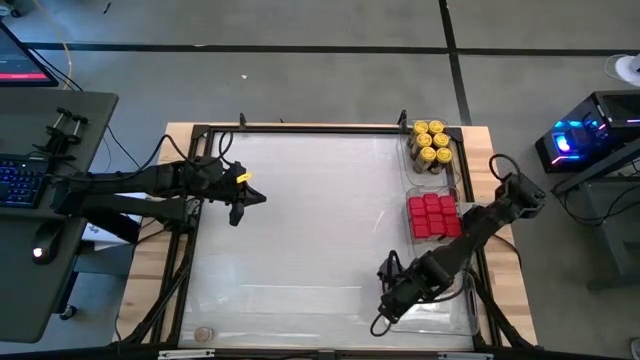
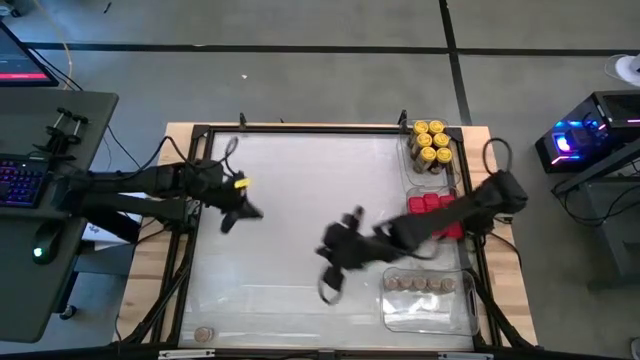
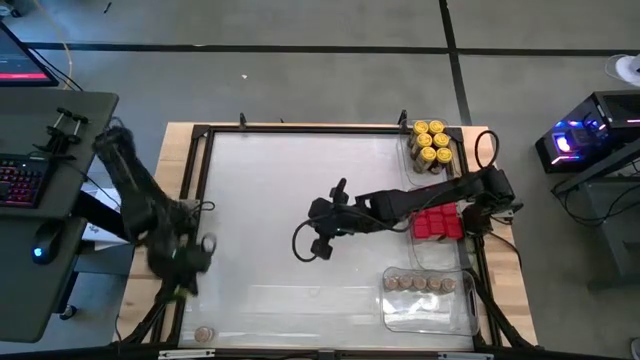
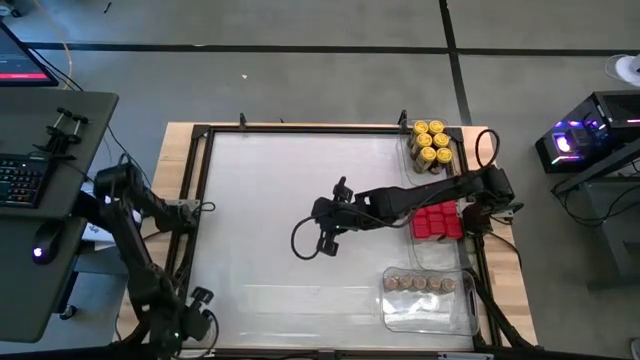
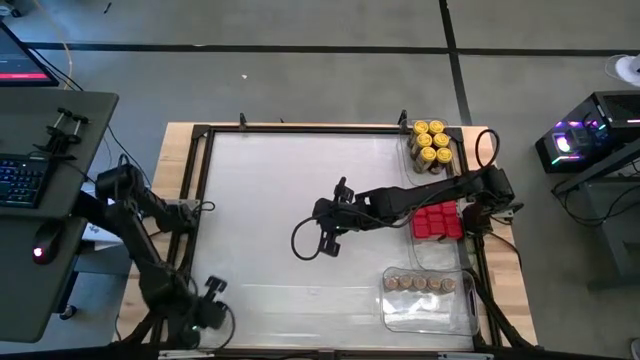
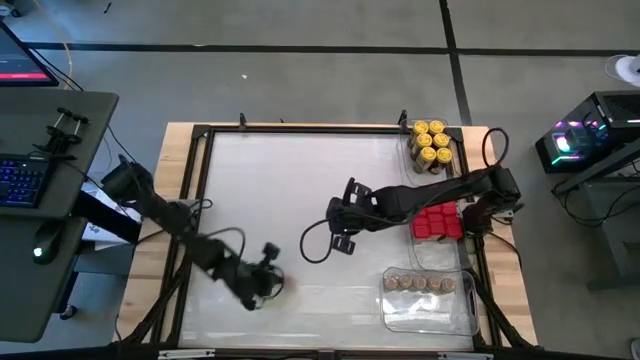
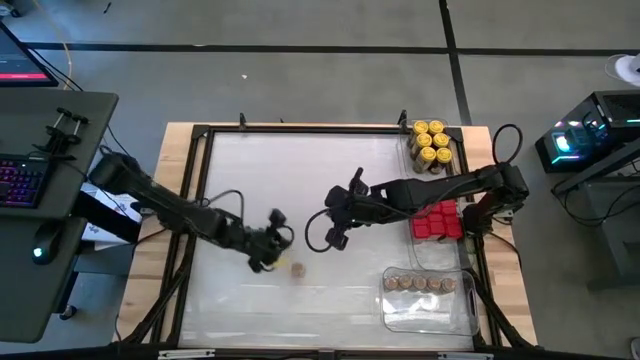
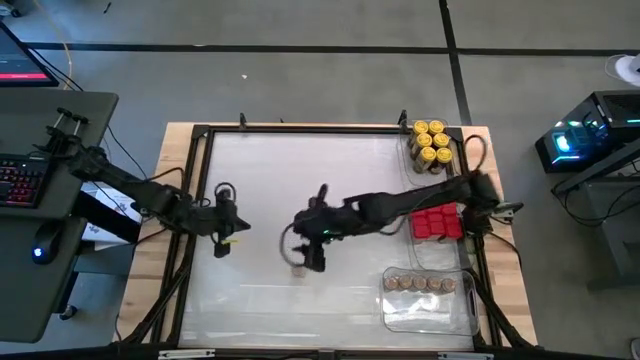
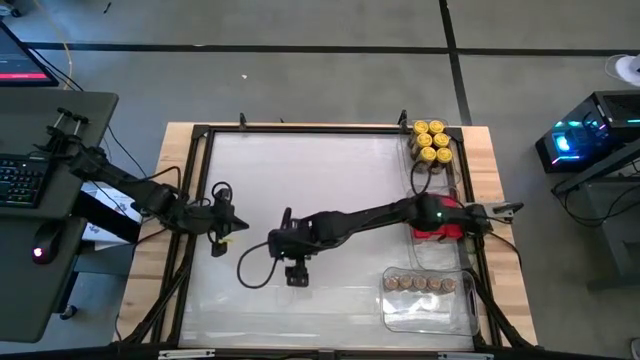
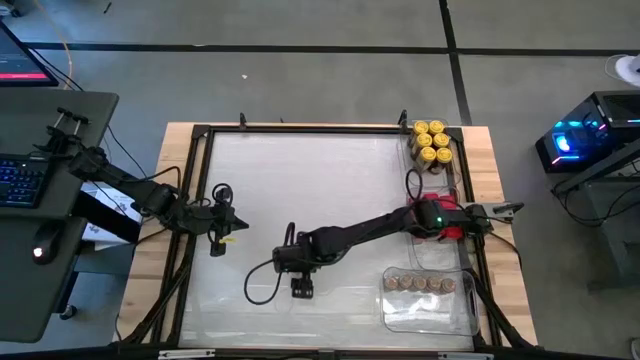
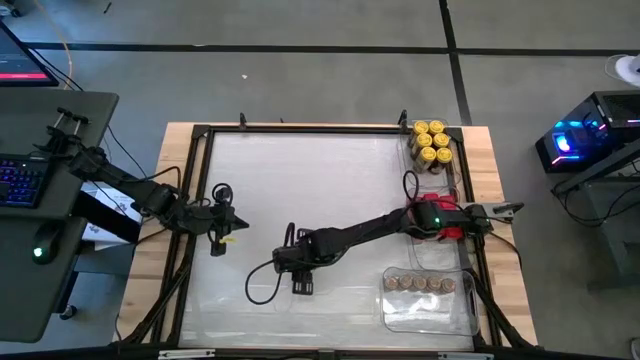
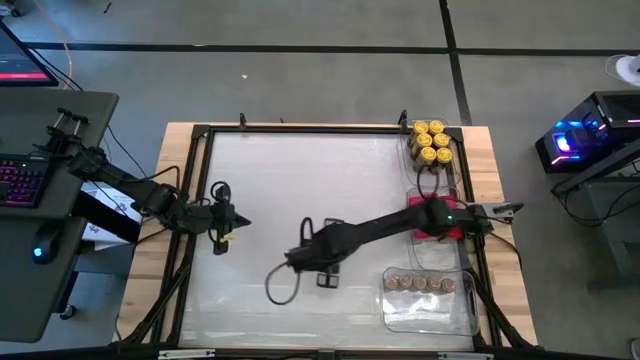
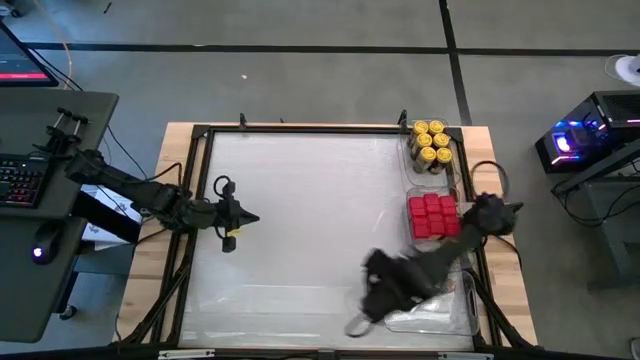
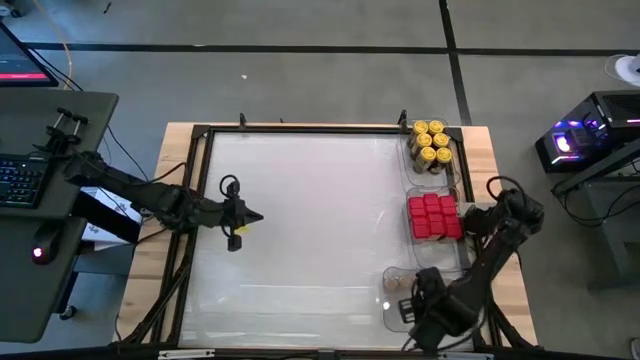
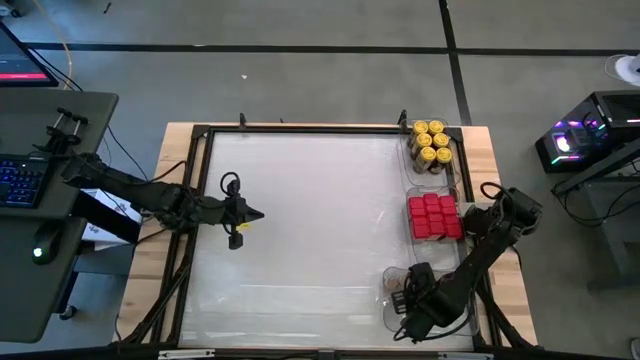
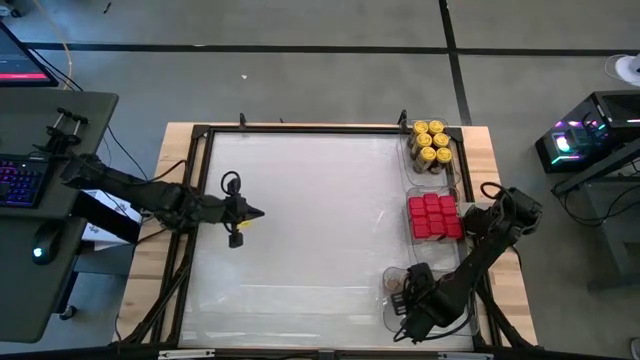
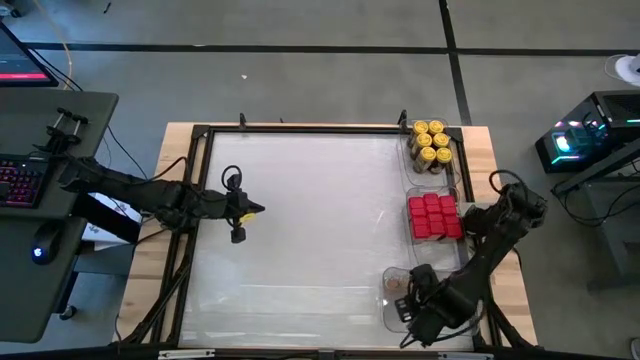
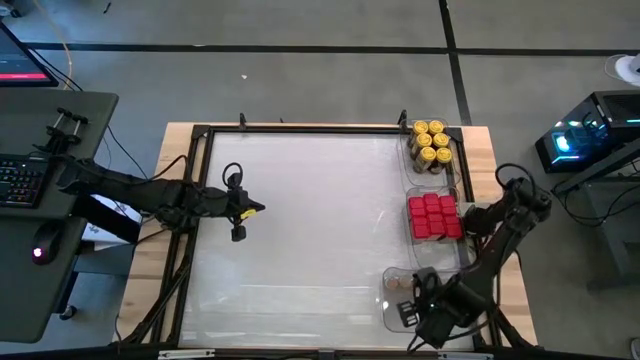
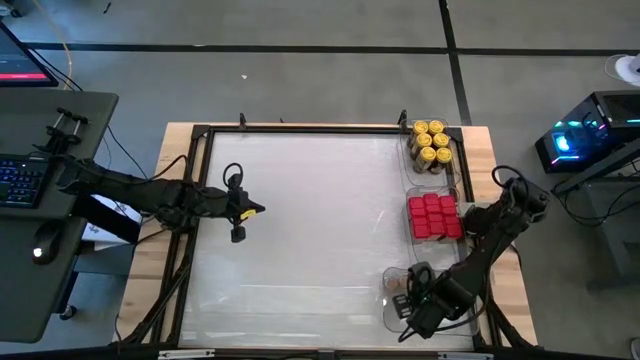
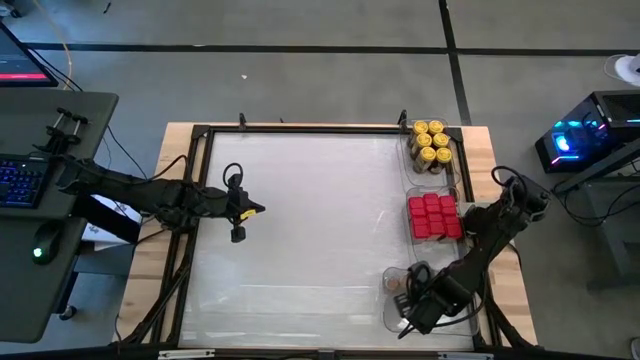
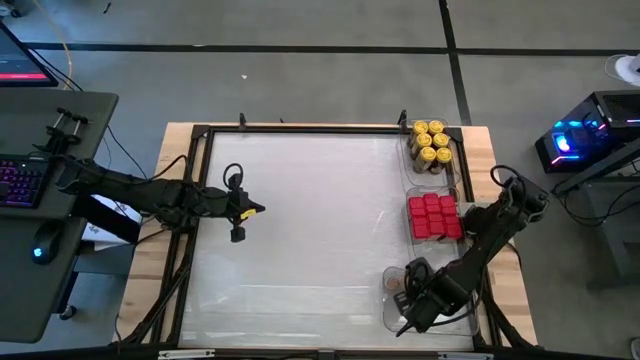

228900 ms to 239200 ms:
Task: Sort spices by type
Put the brown seasoning bottle into the bottom transparent bin

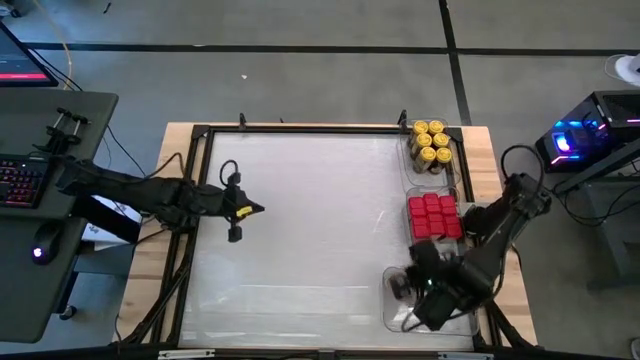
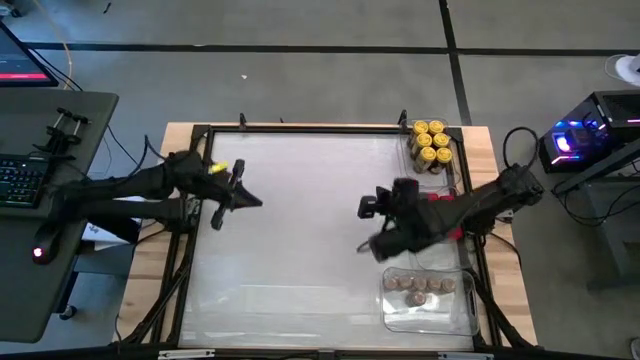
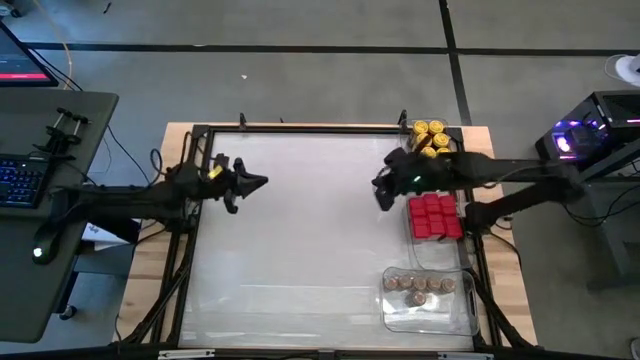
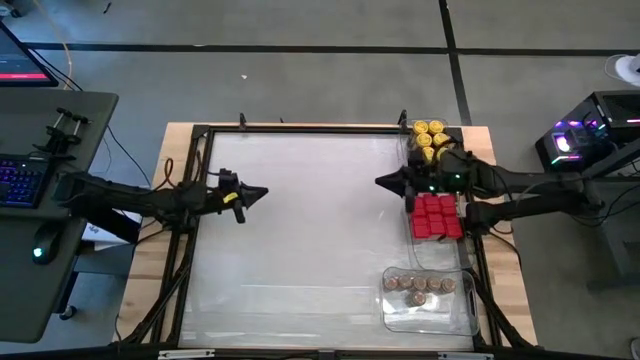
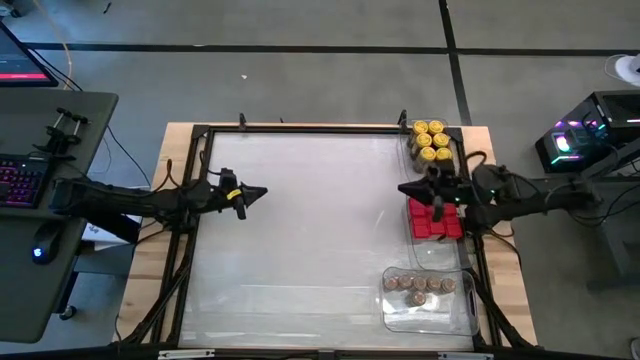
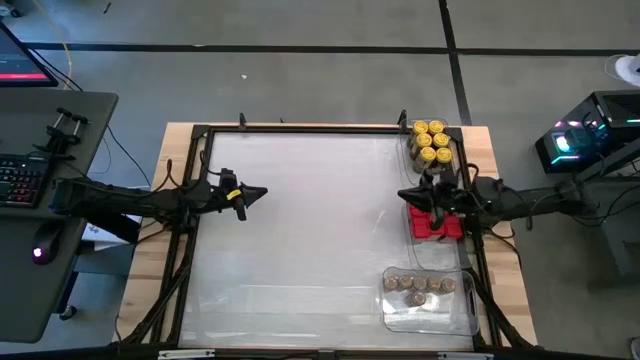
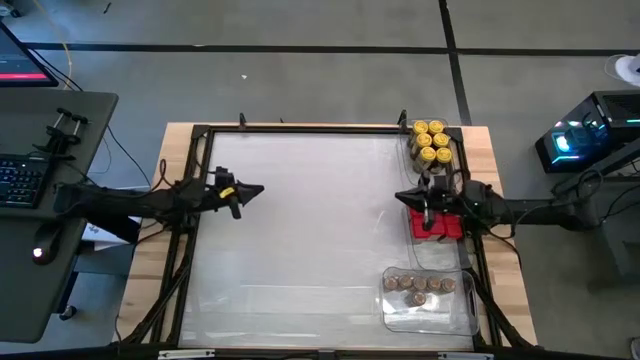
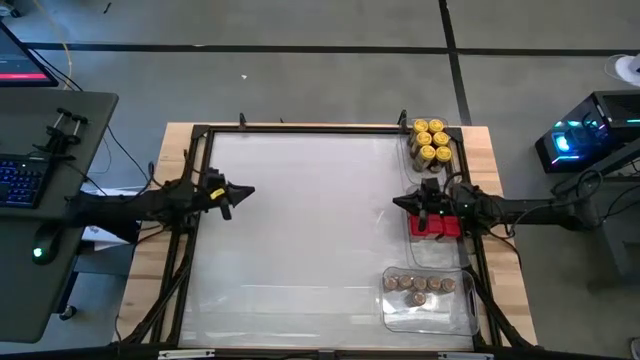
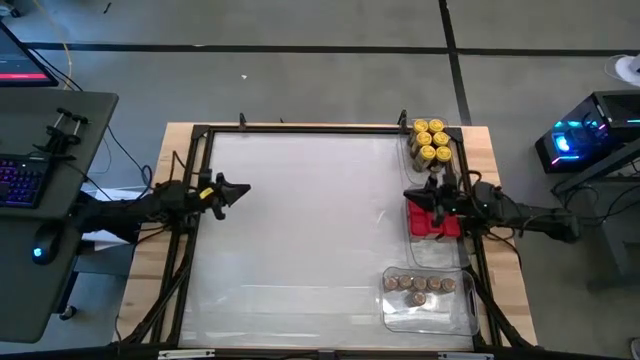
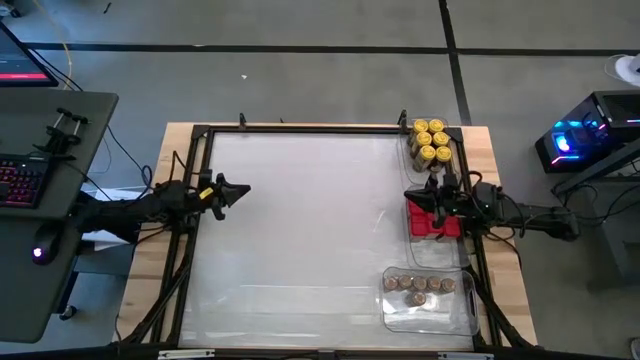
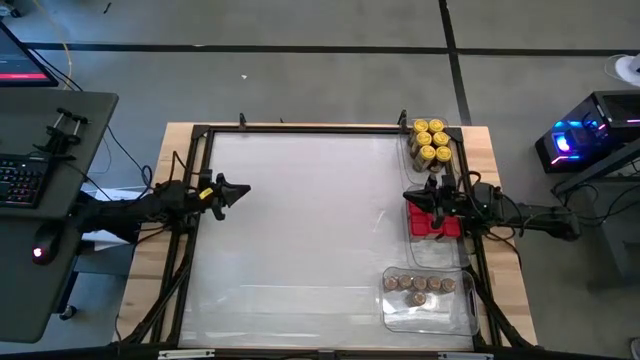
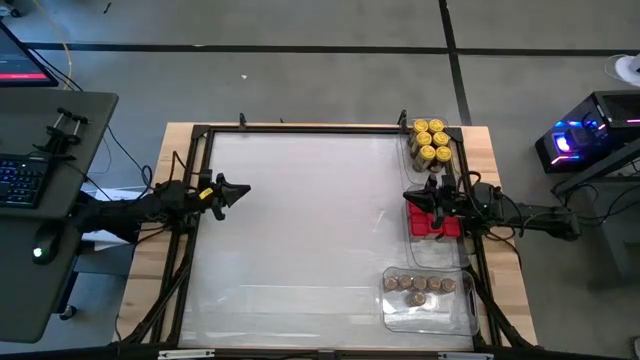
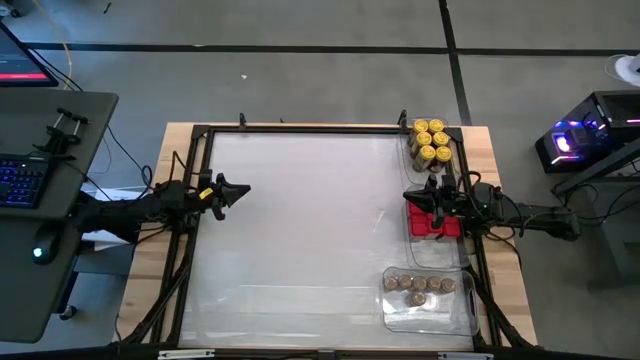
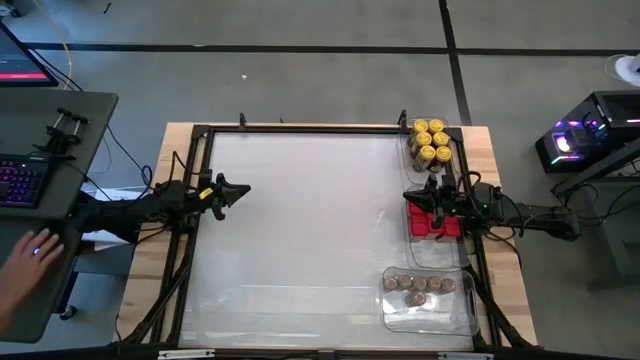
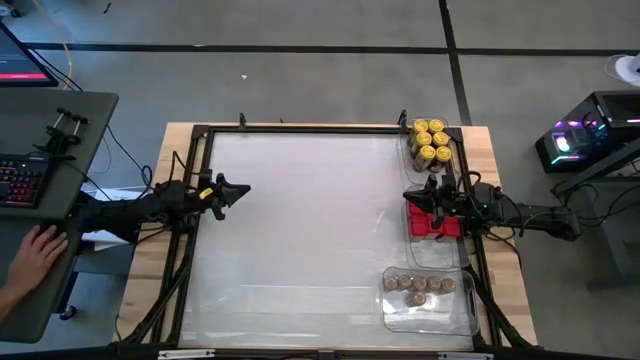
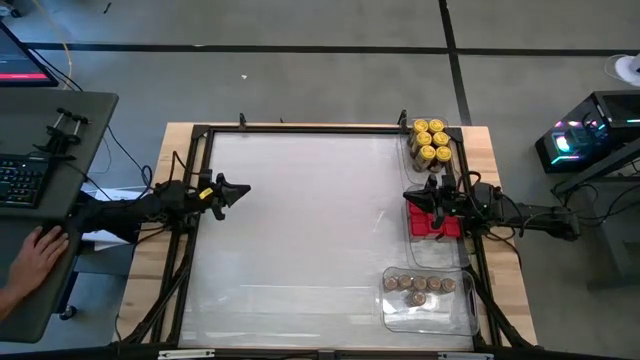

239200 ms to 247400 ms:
Return to Home Position
